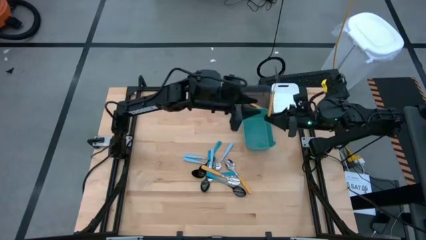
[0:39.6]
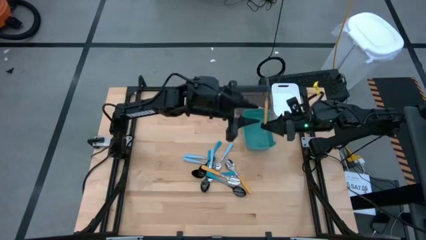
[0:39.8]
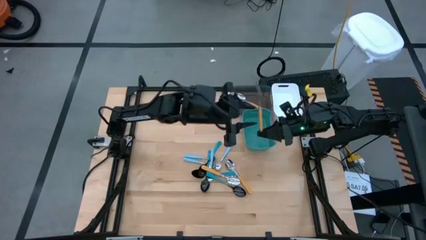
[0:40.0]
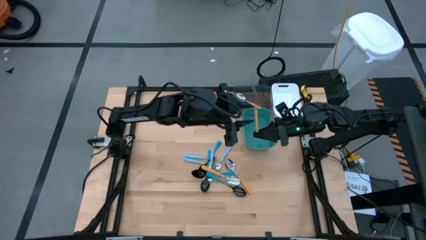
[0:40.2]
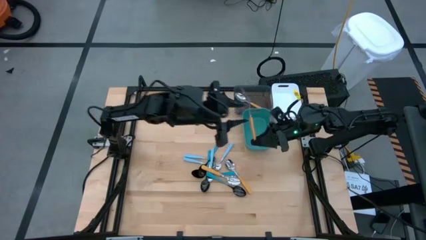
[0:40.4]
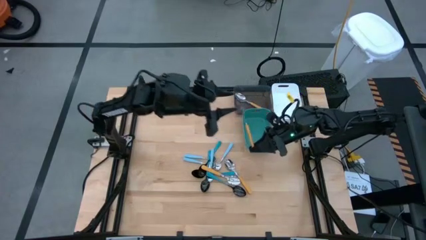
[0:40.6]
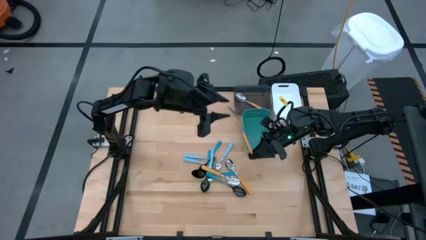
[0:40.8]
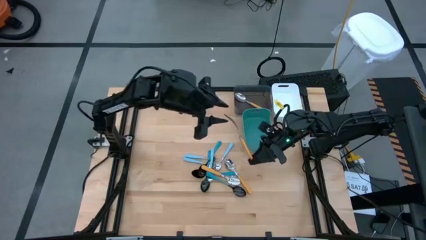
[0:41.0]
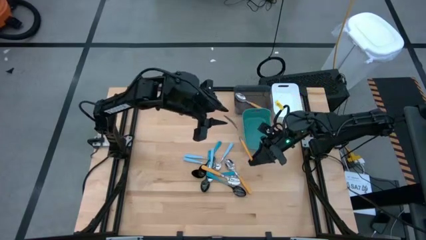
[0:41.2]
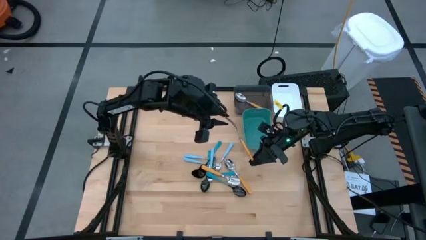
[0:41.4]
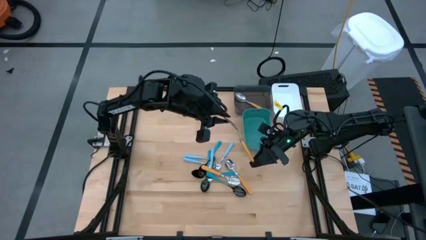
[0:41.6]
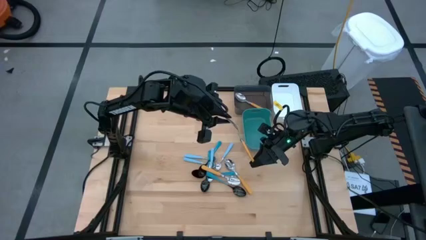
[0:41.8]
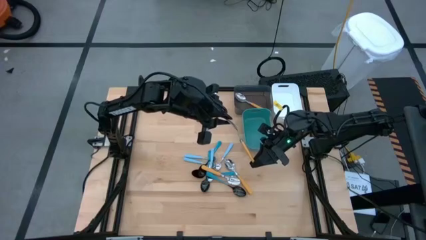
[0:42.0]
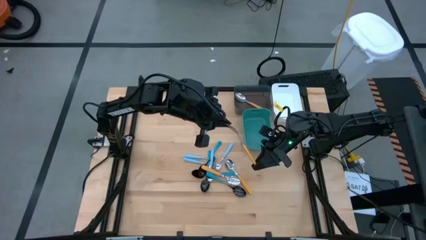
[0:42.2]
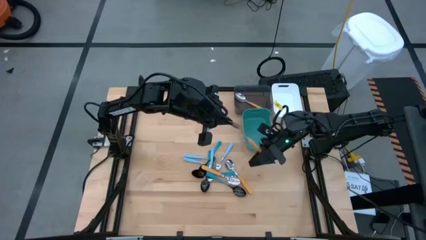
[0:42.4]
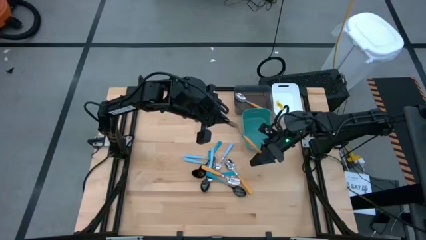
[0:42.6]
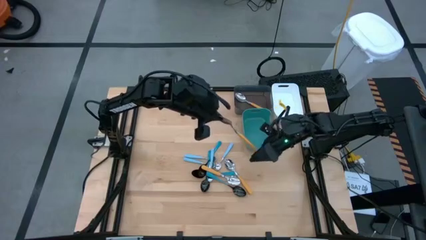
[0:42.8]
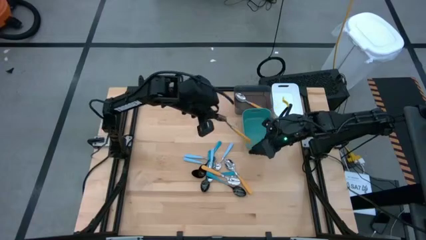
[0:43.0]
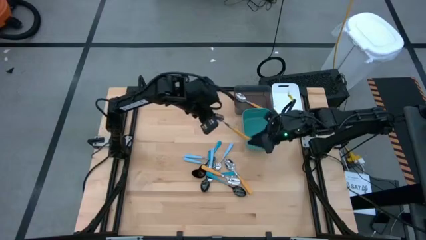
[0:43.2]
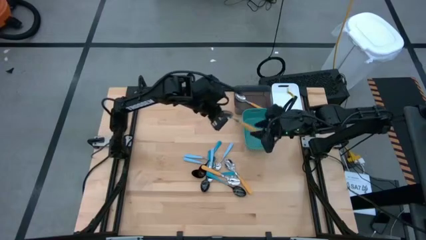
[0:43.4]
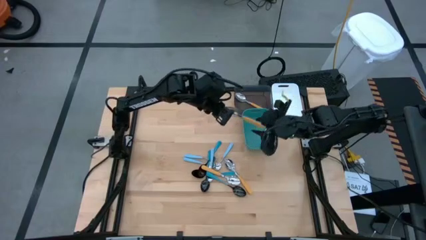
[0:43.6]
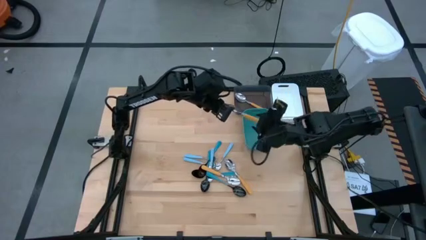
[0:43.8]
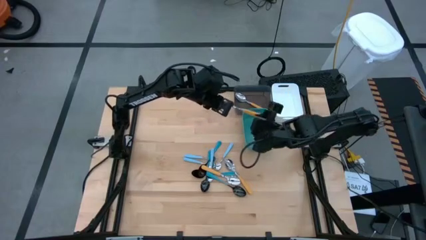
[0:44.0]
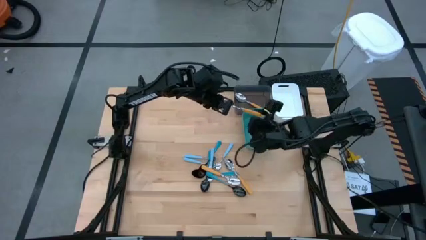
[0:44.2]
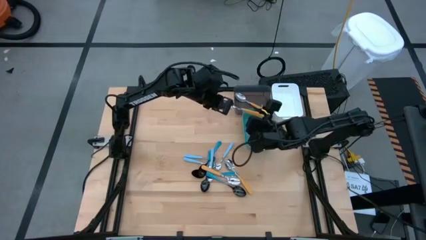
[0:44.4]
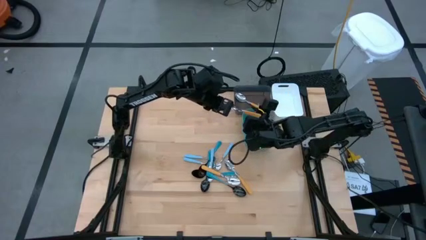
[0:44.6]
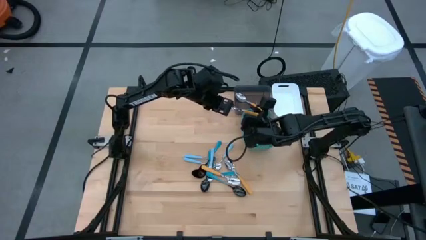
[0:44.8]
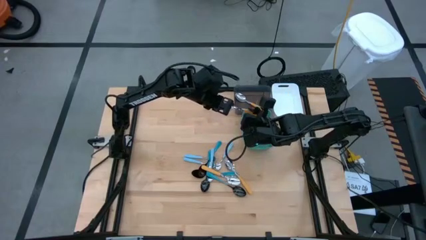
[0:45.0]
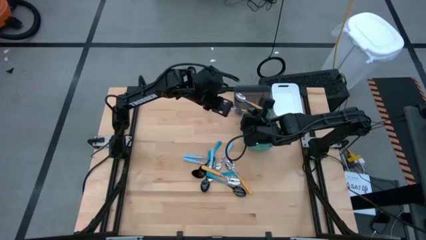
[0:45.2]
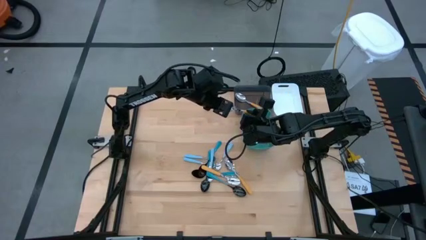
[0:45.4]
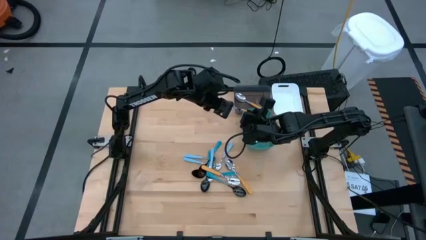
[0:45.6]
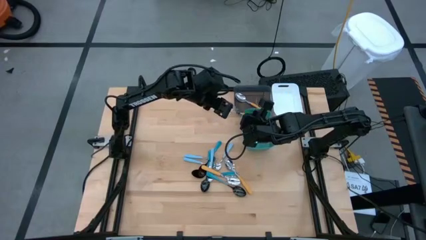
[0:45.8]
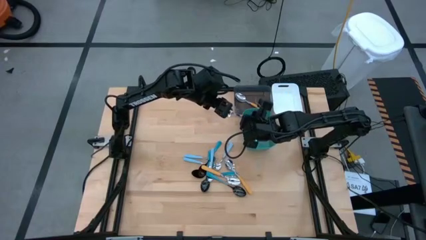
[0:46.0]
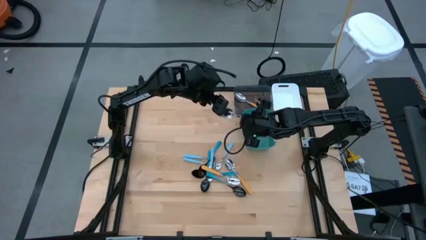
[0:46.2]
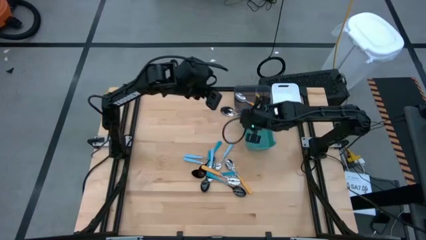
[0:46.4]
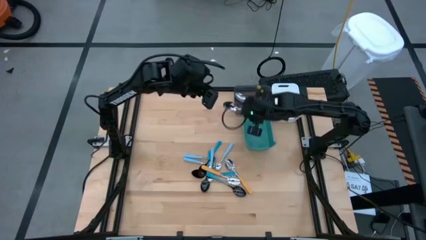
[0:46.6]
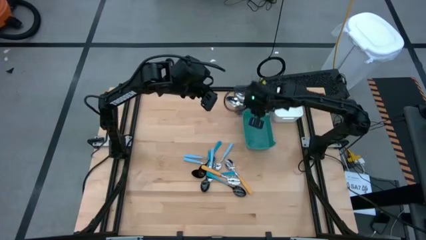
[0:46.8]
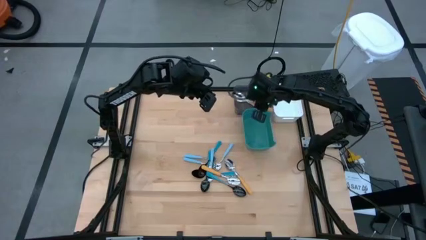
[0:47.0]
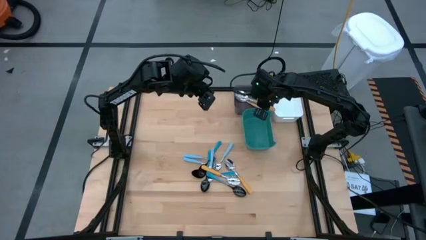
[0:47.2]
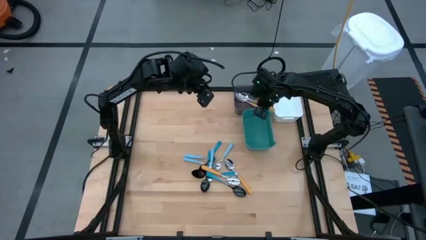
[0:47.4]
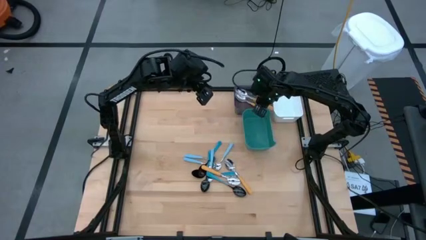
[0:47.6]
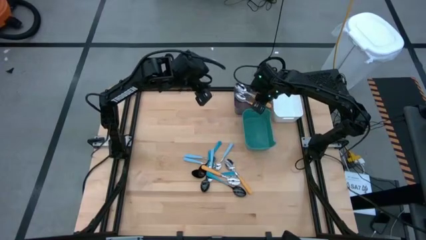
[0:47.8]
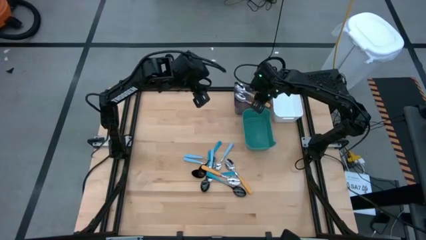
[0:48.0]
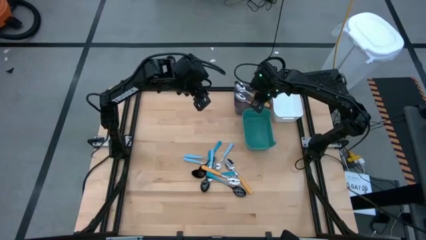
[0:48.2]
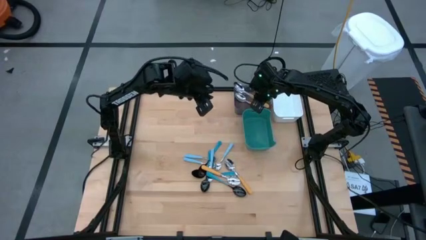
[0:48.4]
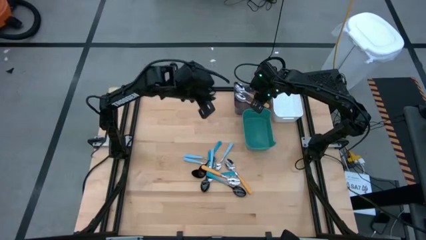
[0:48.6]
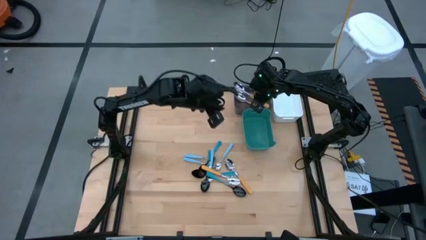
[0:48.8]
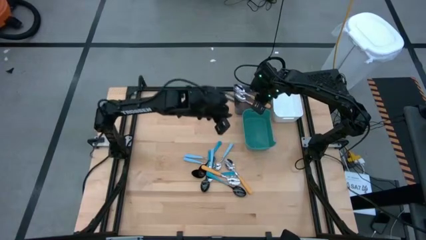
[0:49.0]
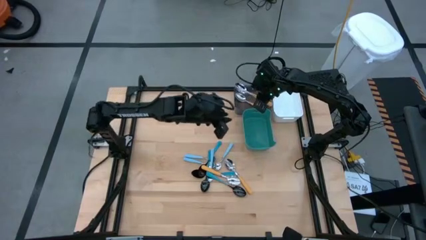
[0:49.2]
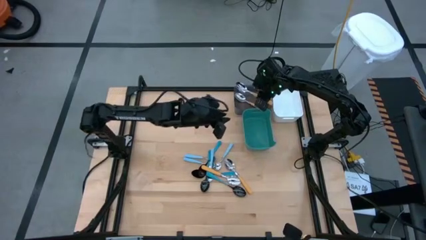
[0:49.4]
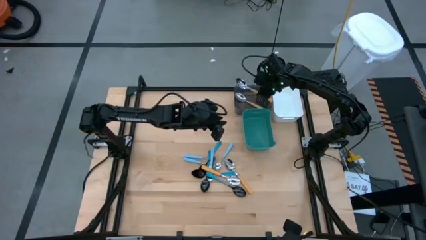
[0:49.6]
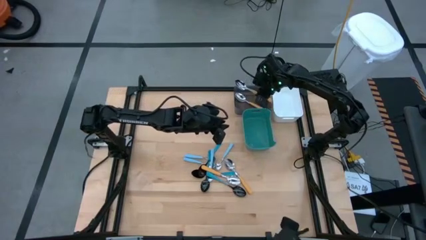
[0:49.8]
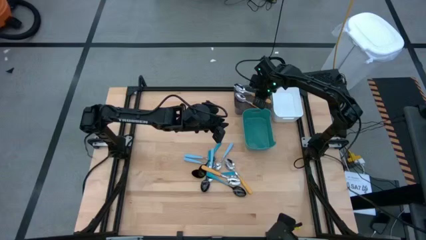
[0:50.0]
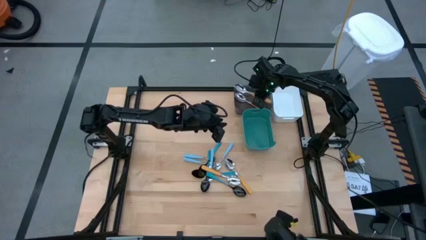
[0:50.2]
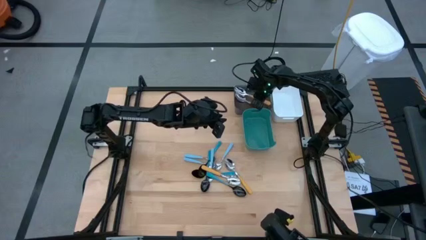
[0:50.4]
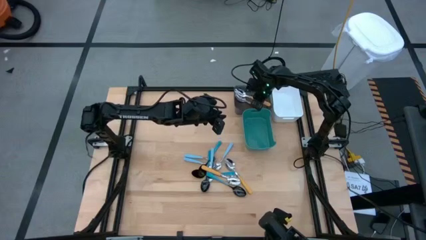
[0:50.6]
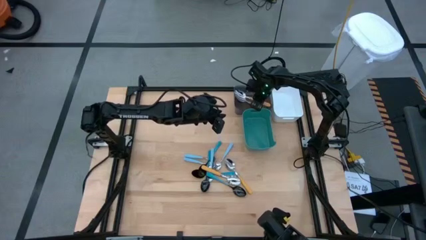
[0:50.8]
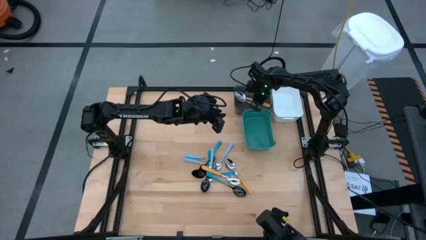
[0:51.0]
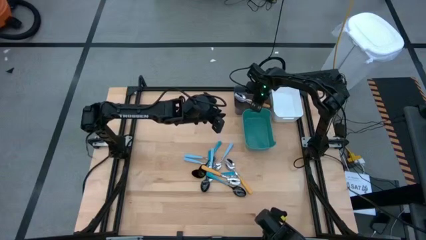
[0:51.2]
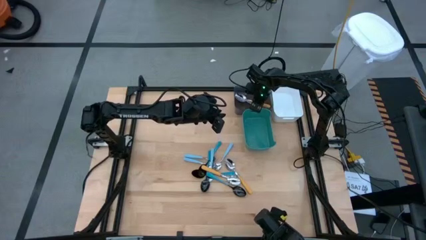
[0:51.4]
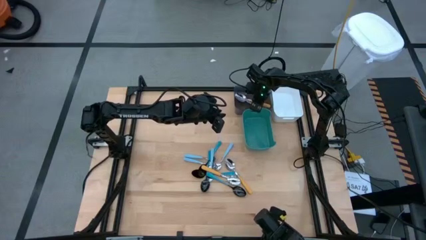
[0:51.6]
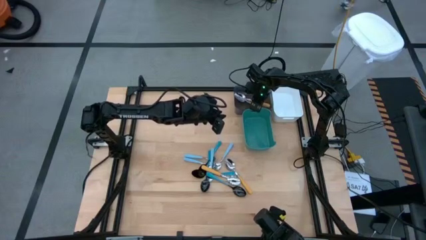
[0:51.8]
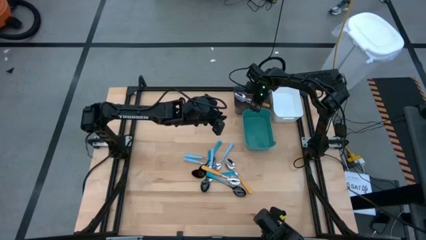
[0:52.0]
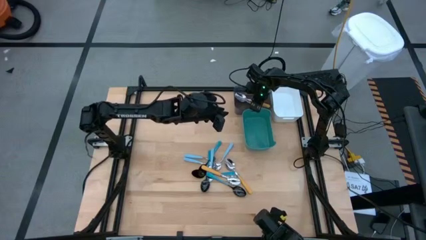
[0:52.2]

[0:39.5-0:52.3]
Task: Sort silverware by color (type)
Put the orange spoon into the black bin

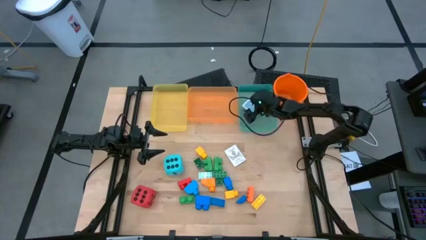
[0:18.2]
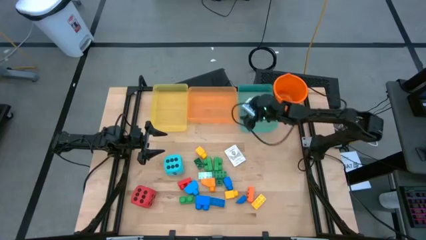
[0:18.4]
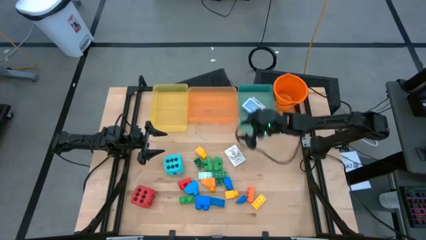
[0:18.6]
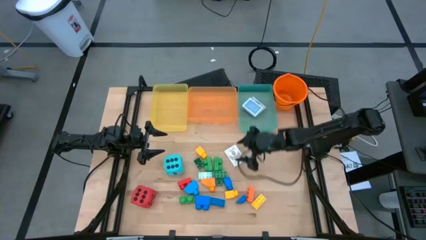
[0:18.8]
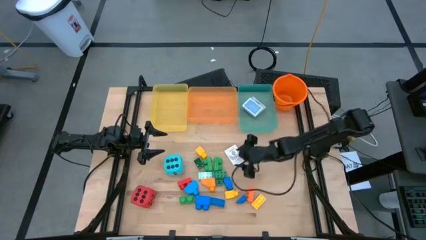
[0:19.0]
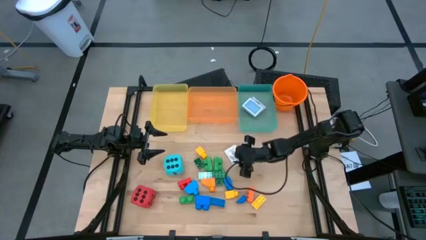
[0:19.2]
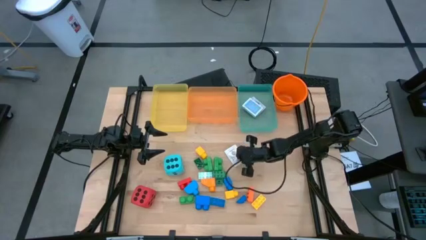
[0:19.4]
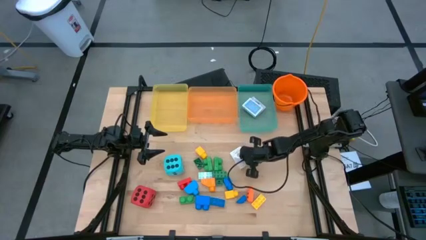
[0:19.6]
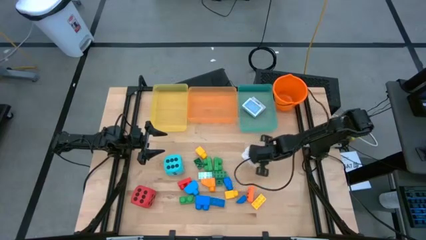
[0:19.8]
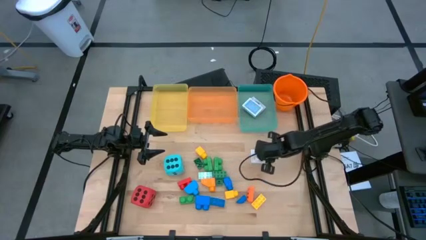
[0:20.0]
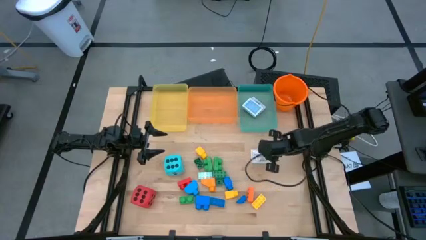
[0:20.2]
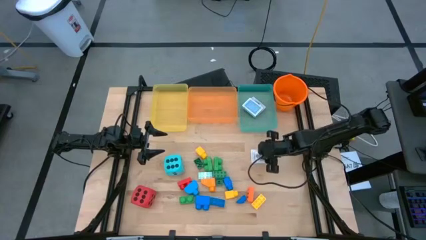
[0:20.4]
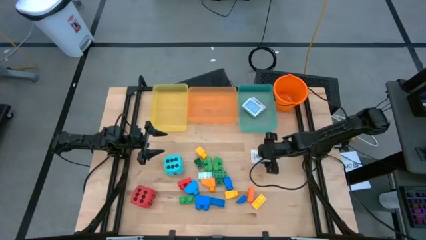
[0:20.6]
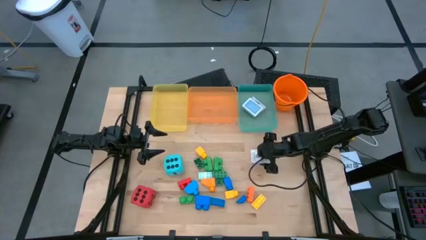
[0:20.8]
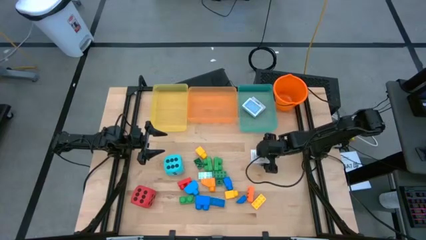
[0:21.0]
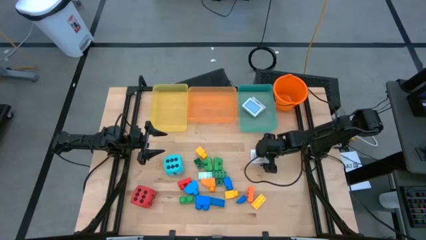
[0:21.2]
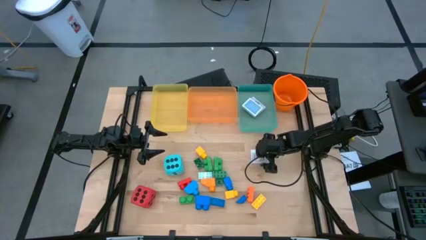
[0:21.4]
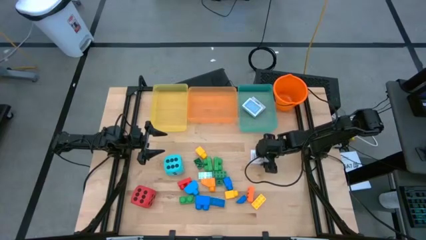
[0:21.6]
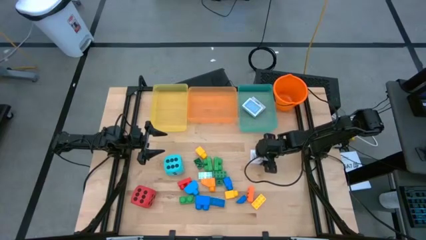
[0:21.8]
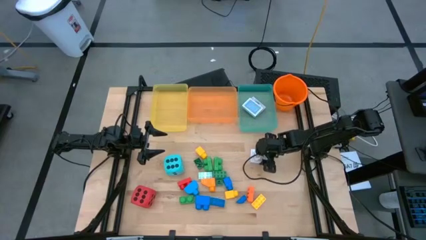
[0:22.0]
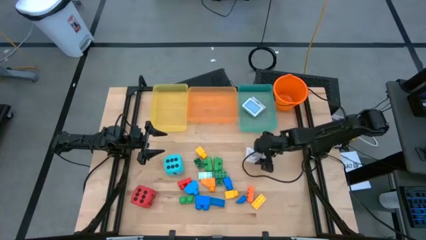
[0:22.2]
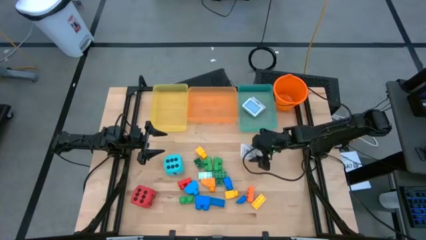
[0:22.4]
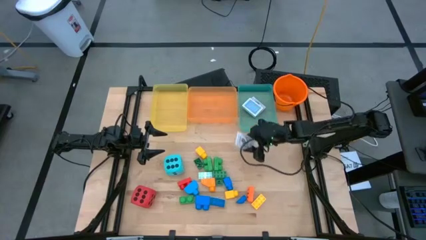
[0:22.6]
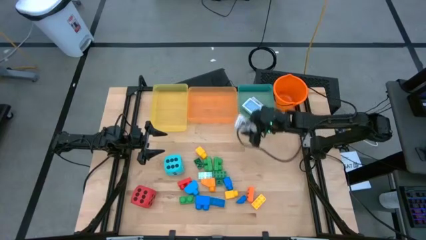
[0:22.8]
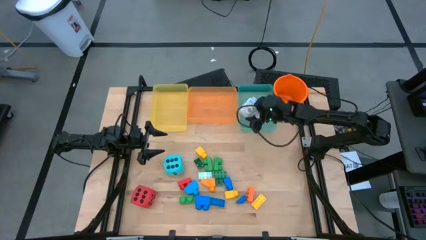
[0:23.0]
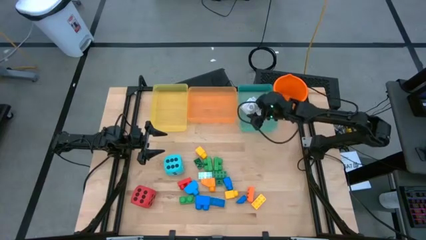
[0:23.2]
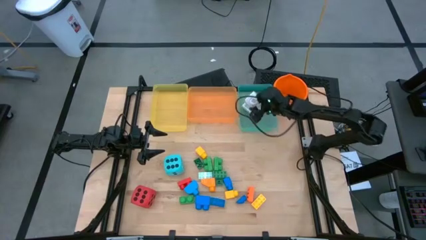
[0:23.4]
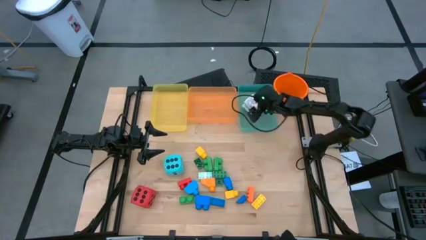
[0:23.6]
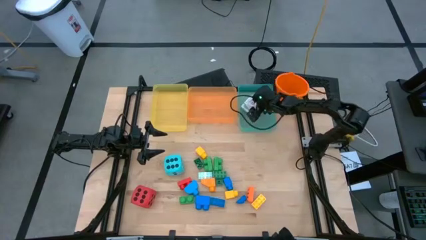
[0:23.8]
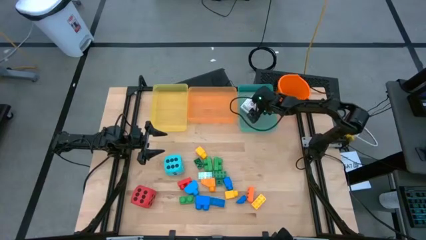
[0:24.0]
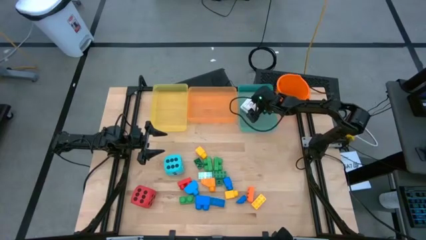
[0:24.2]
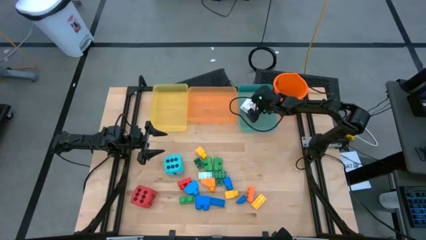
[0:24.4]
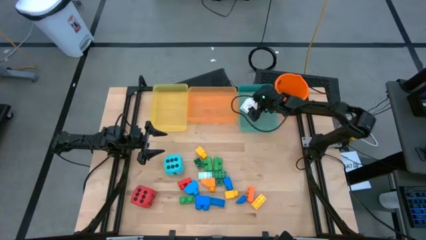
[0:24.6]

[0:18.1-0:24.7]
Task: Pick & Place Toys
Put the brown game card into the green bin
